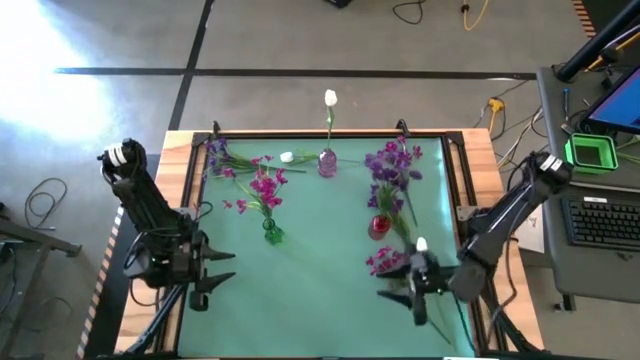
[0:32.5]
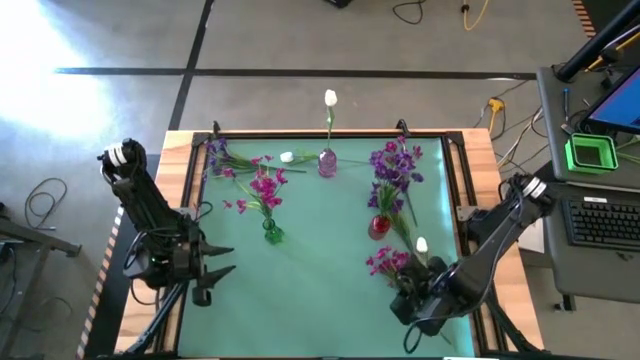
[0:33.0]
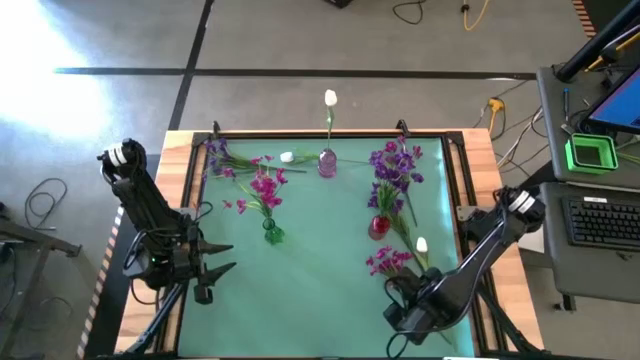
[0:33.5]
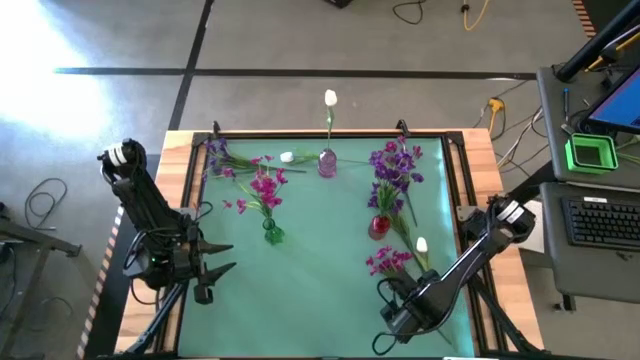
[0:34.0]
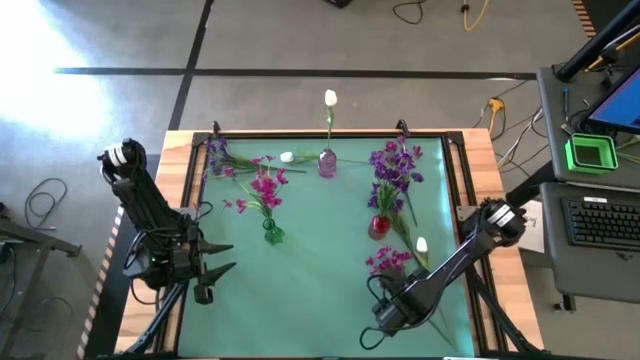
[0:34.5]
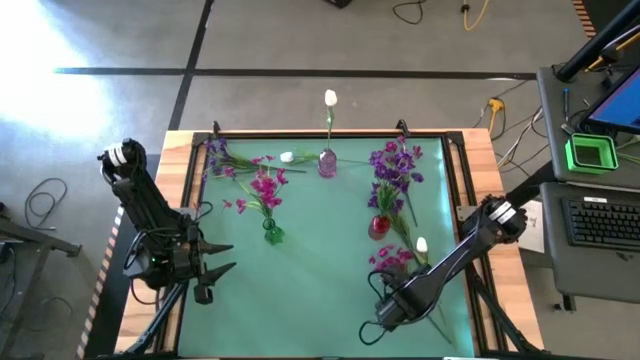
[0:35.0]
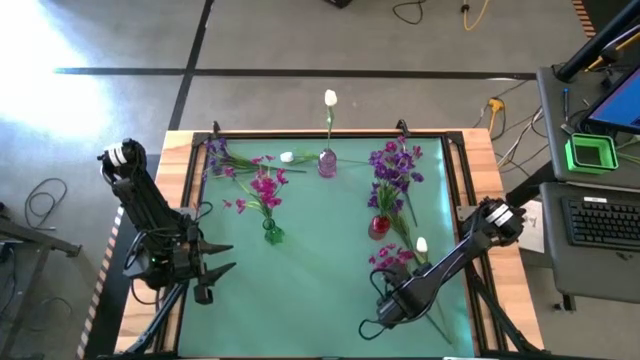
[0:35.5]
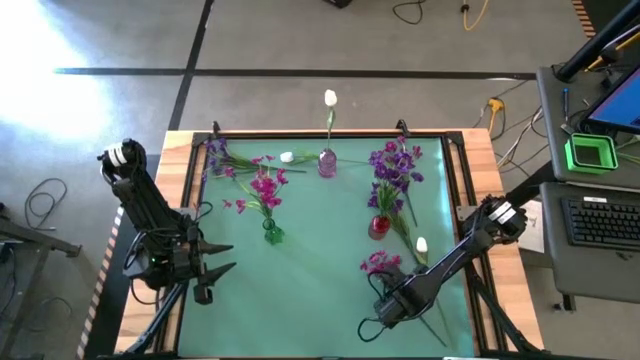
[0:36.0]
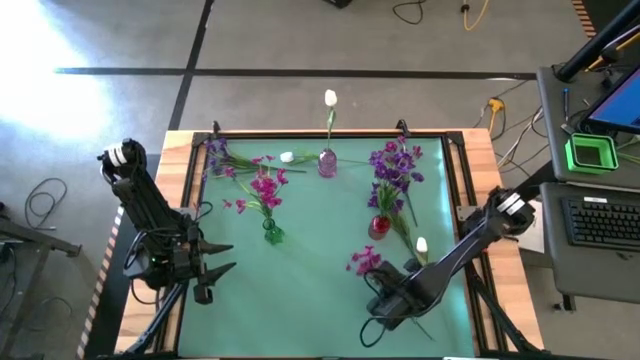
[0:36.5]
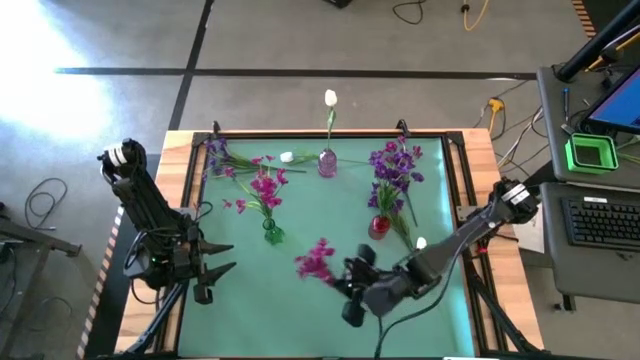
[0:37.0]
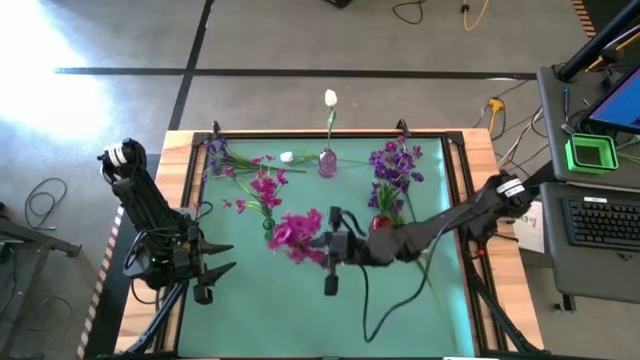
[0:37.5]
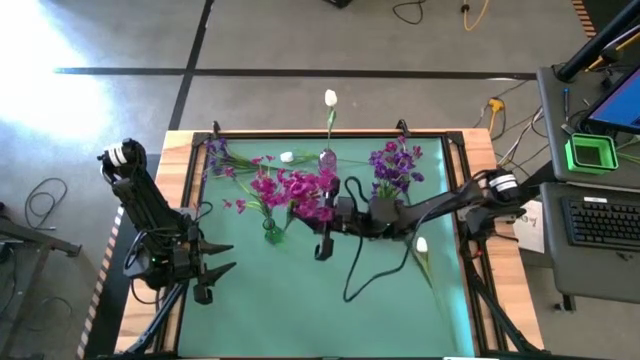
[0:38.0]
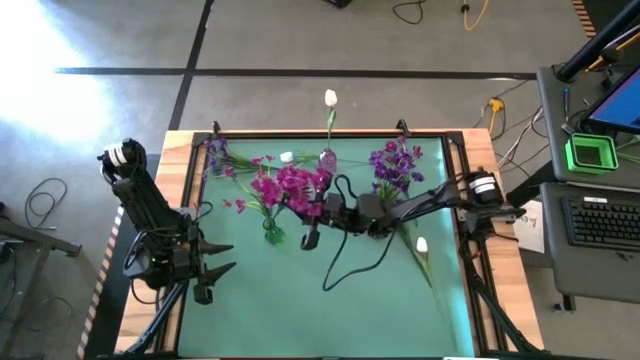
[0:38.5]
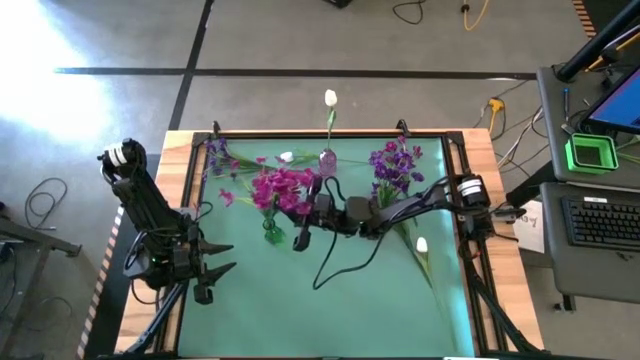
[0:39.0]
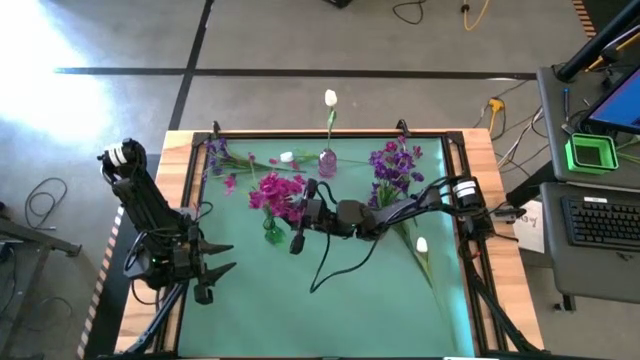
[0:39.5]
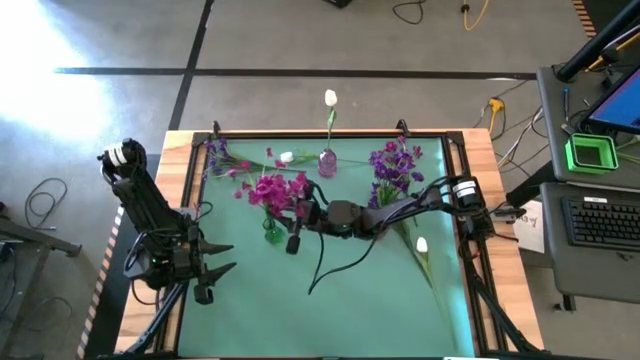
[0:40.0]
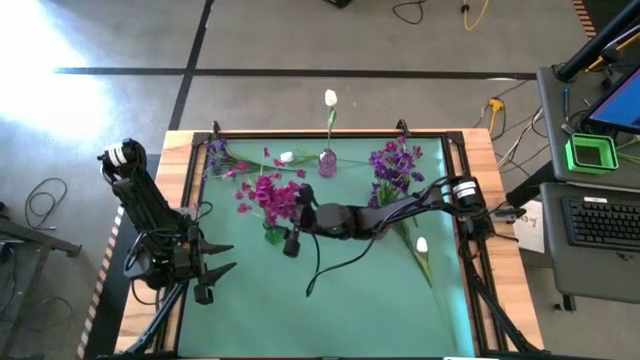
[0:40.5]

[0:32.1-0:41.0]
Task: Sort flowers into vase by color
Put the bottom pink flowers into the green flower vase

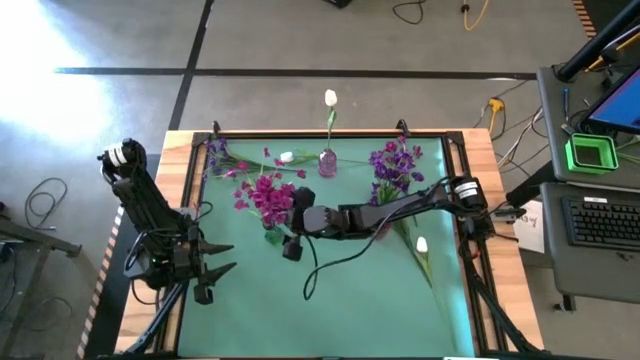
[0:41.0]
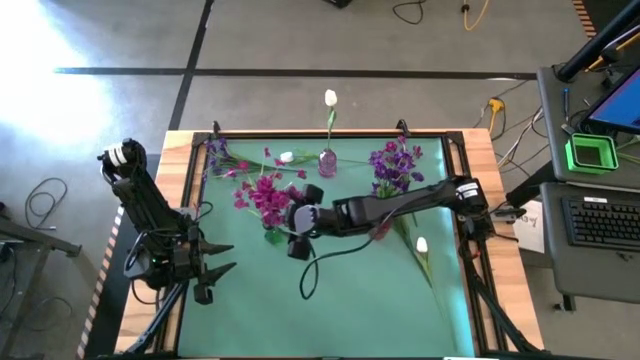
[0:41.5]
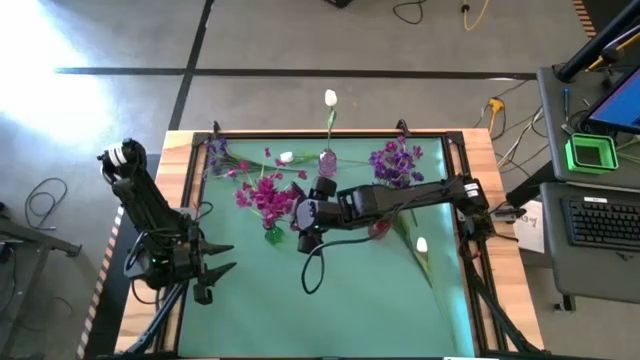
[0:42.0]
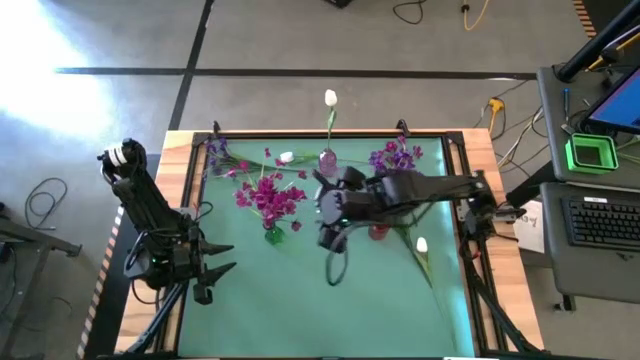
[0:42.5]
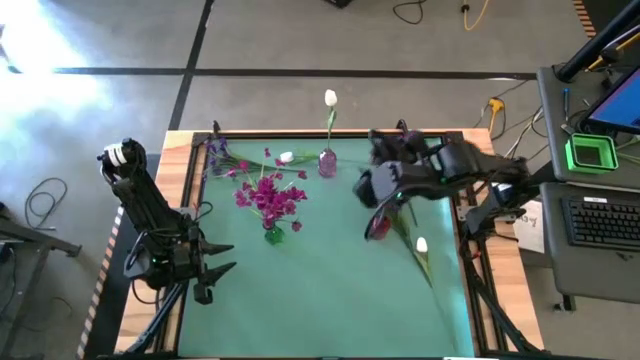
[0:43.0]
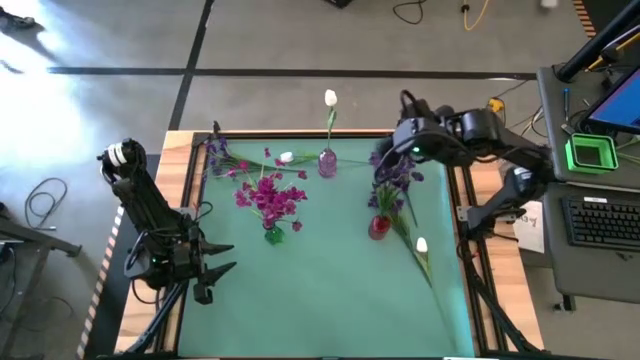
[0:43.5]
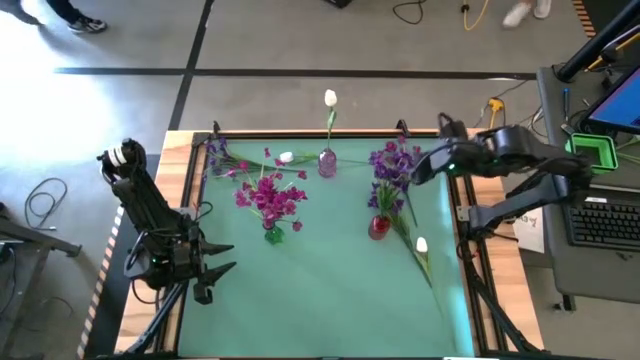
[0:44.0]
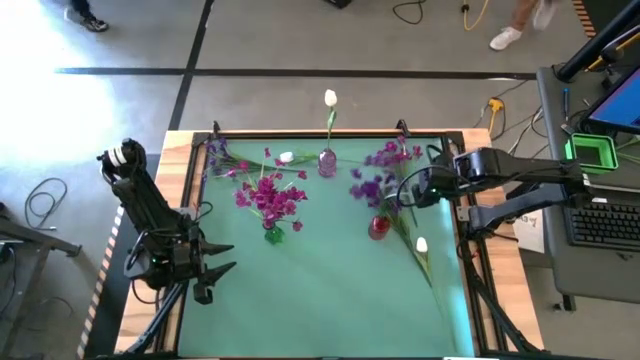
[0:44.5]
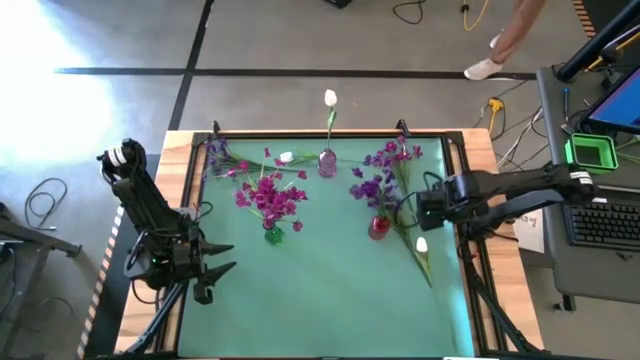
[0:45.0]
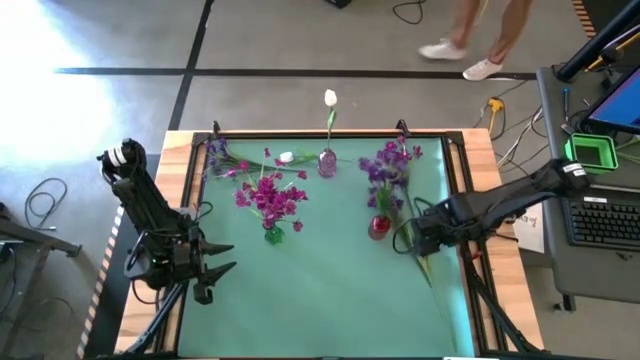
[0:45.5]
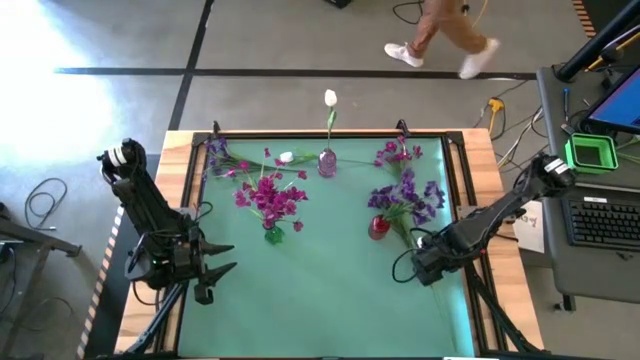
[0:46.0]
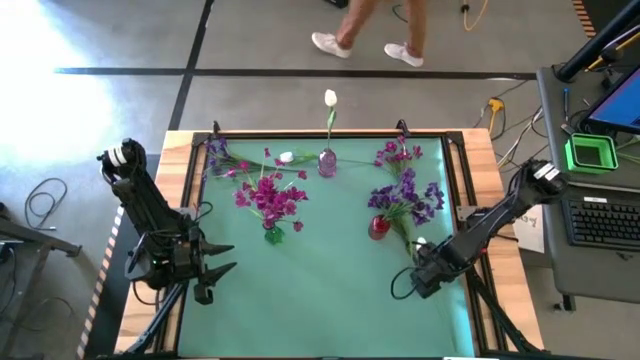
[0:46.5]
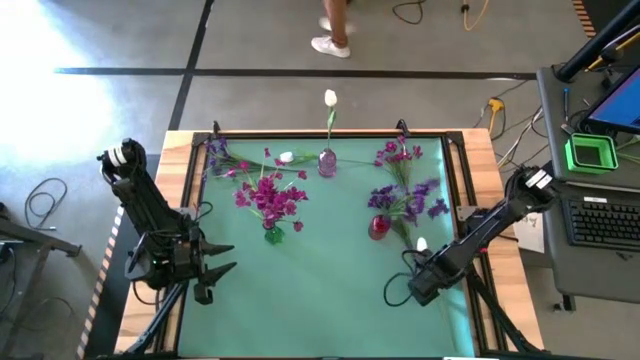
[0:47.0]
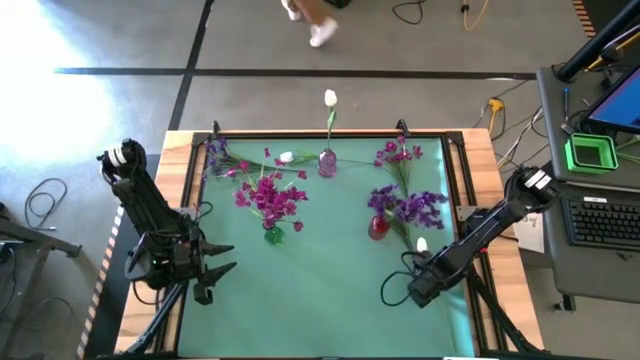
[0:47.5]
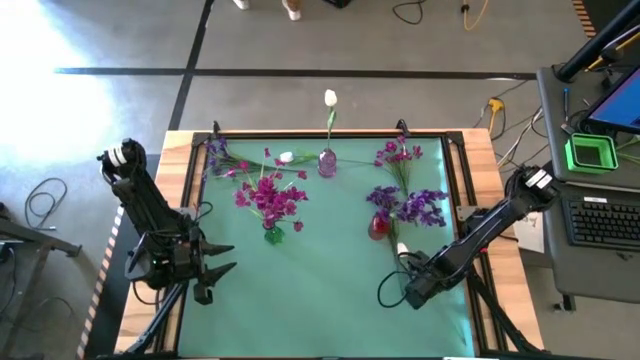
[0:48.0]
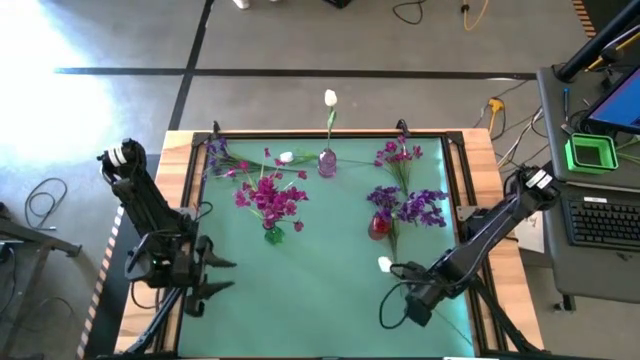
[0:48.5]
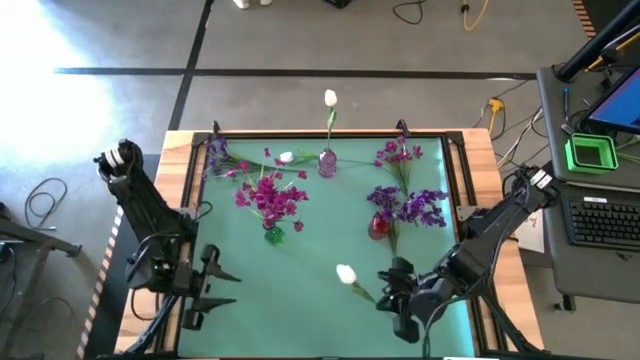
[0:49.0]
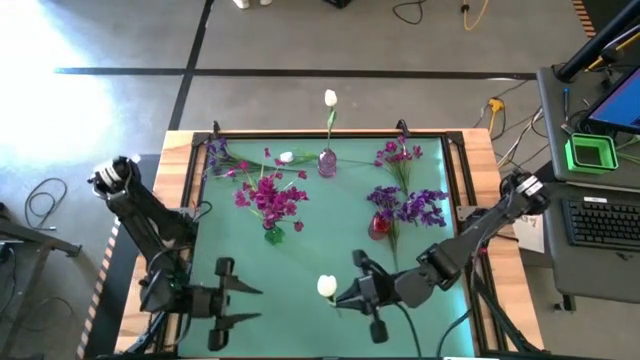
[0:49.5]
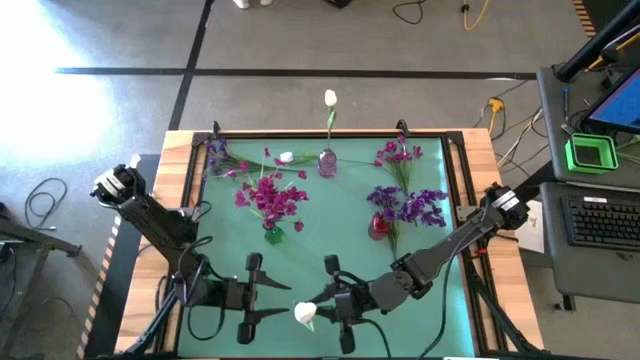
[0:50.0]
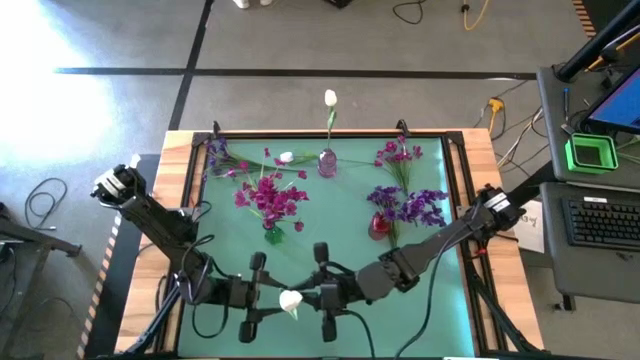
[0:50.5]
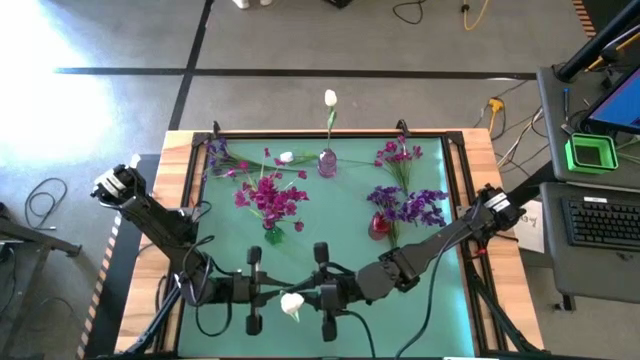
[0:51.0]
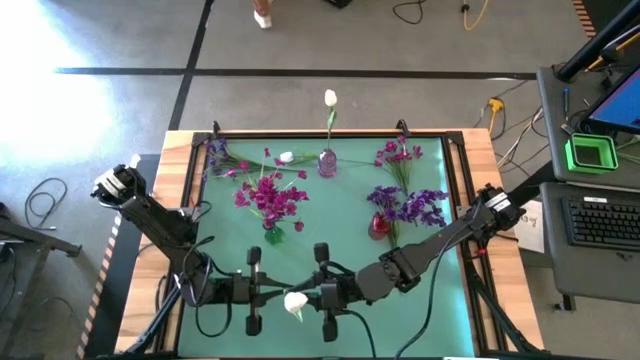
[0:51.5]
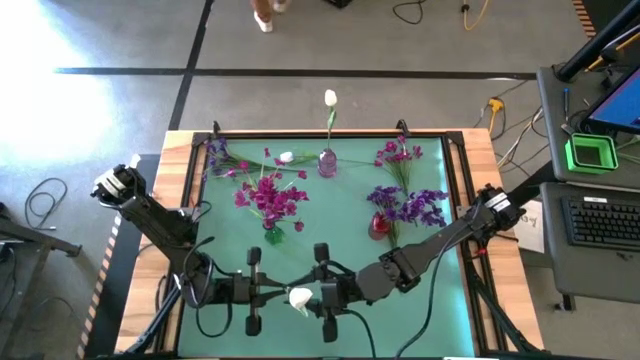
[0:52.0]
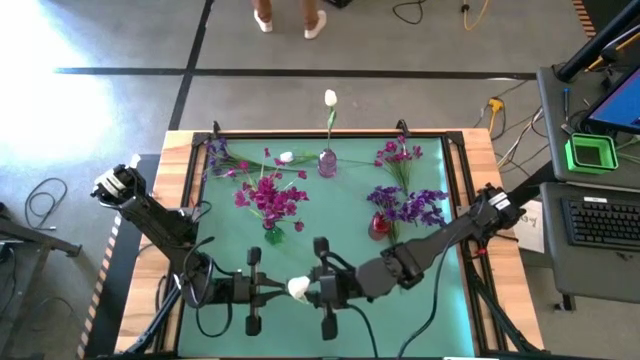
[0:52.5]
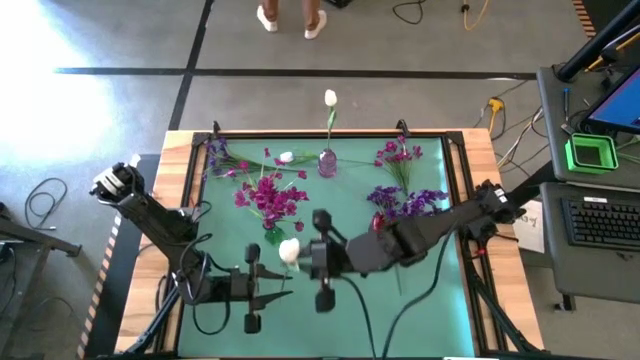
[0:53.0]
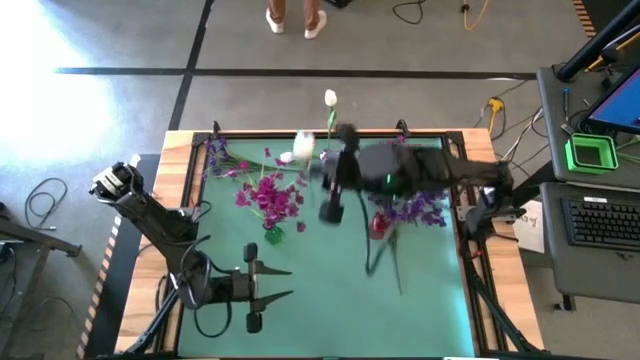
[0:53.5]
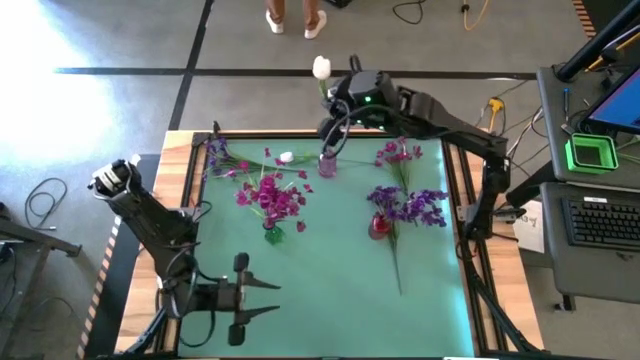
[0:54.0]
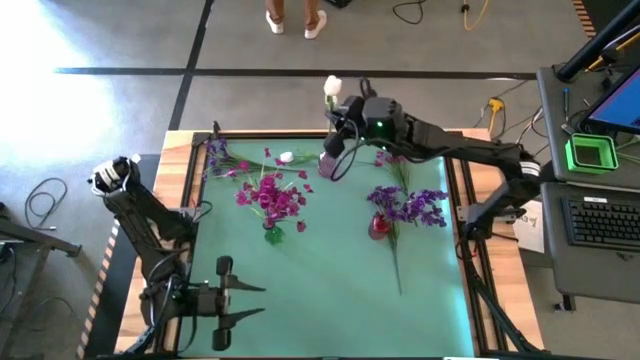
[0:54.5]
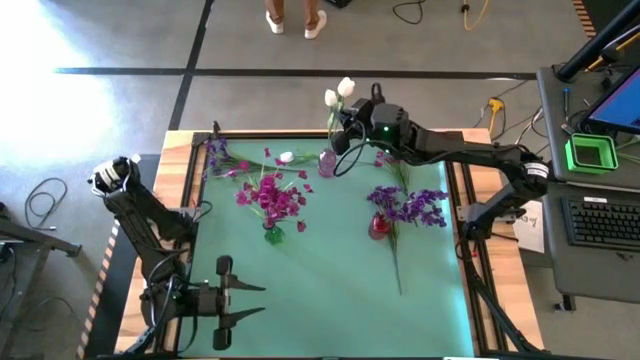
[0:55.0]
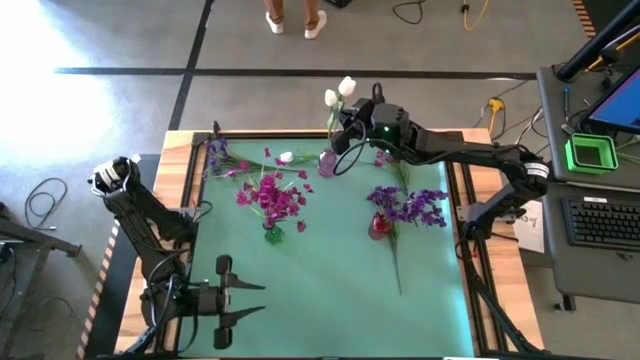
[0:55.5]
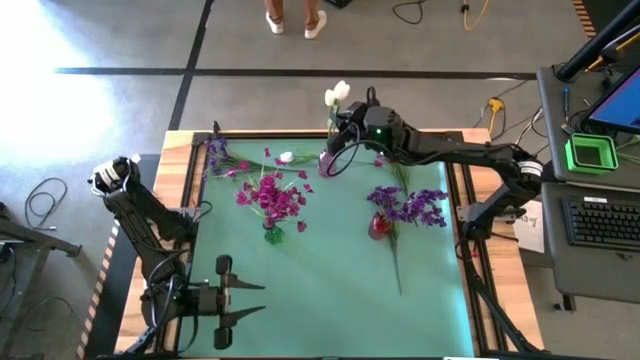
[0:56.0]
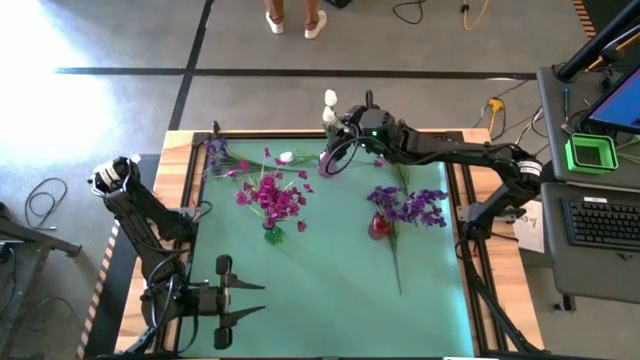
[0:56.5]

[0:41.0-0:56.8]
Put the bottom white tulip into the purple flower vase
